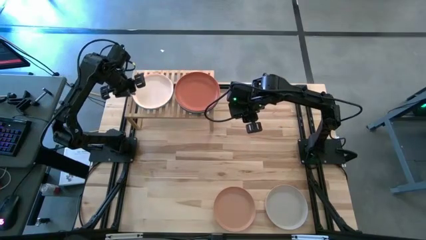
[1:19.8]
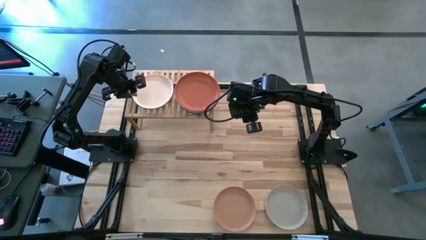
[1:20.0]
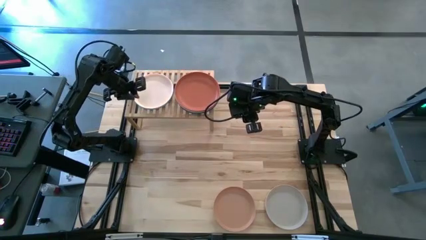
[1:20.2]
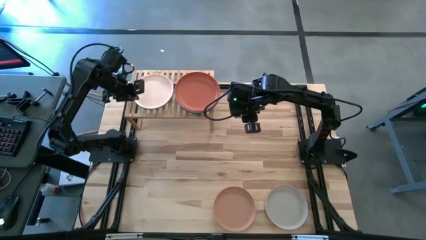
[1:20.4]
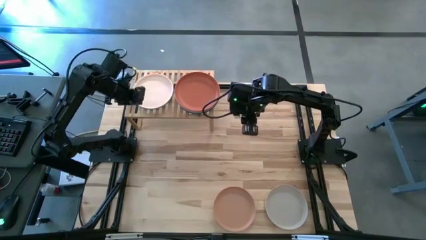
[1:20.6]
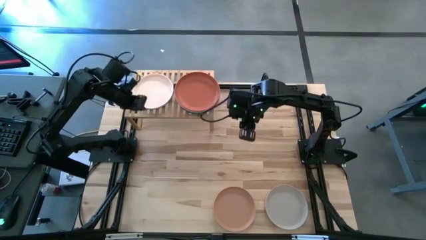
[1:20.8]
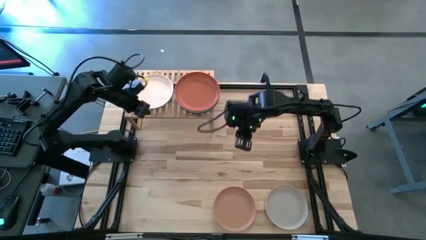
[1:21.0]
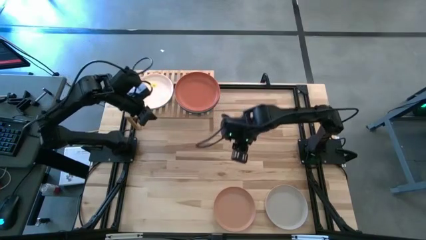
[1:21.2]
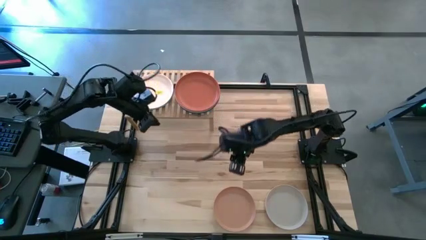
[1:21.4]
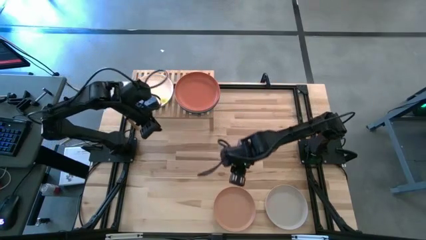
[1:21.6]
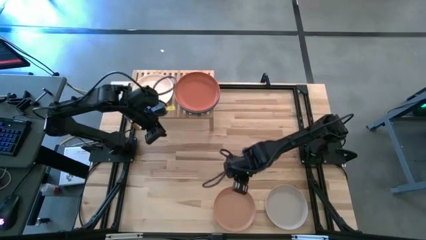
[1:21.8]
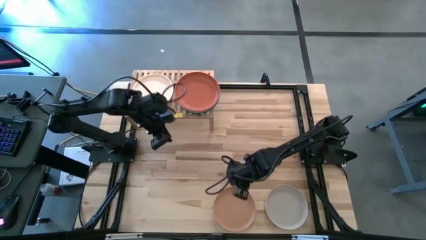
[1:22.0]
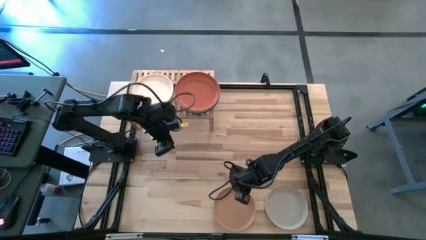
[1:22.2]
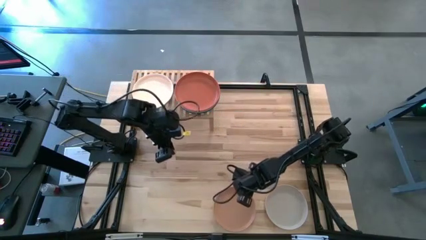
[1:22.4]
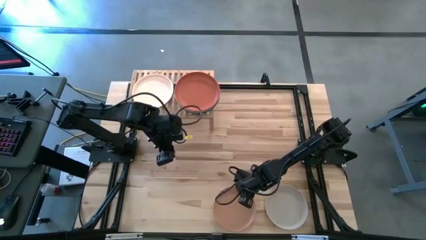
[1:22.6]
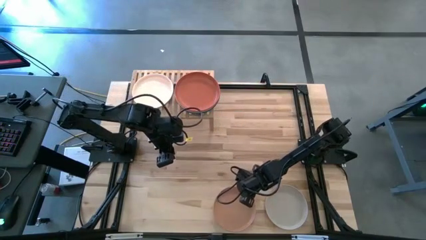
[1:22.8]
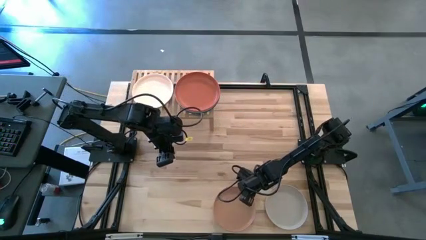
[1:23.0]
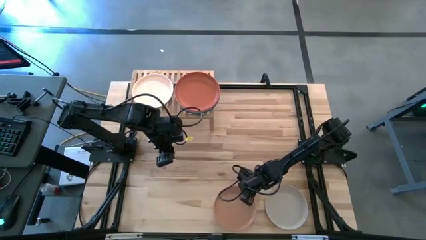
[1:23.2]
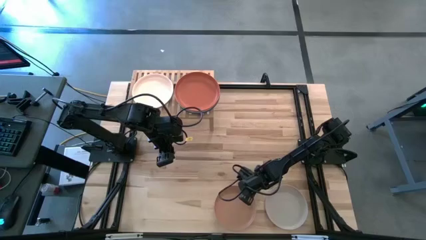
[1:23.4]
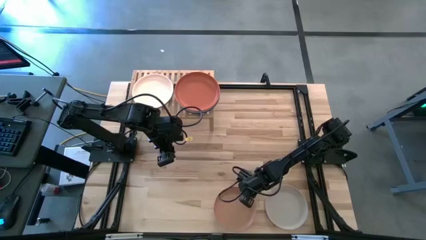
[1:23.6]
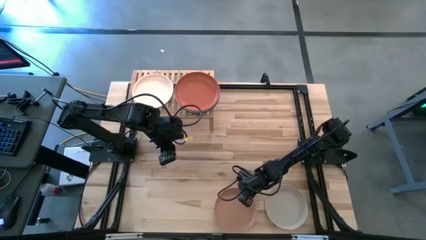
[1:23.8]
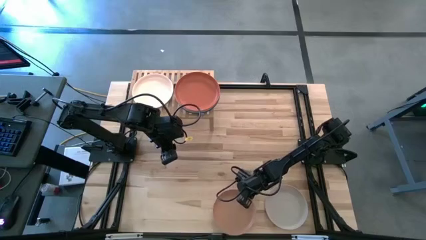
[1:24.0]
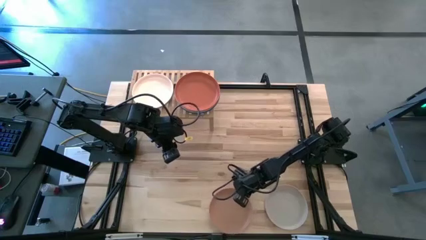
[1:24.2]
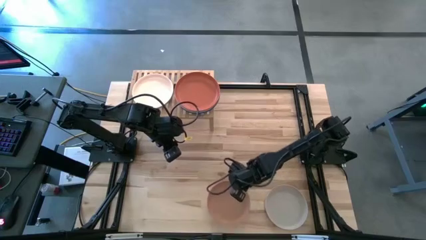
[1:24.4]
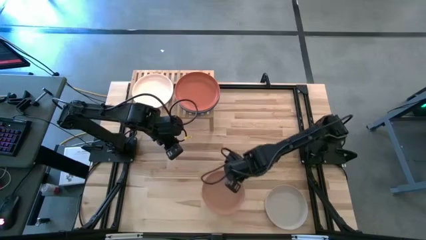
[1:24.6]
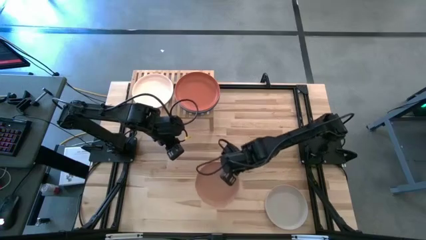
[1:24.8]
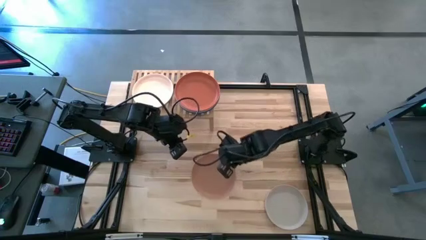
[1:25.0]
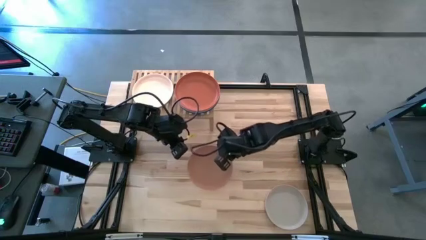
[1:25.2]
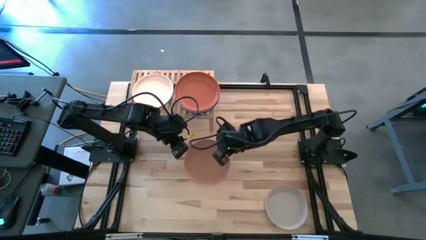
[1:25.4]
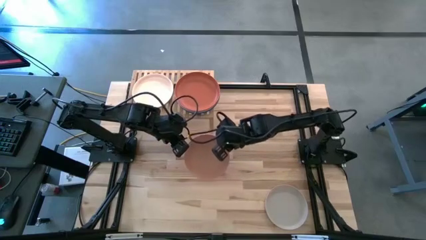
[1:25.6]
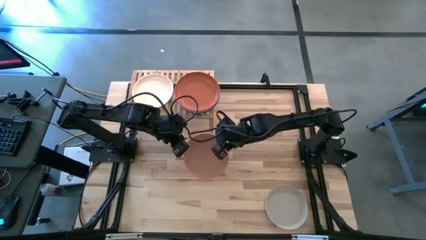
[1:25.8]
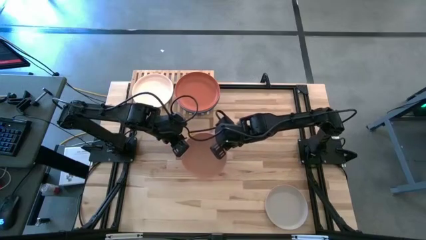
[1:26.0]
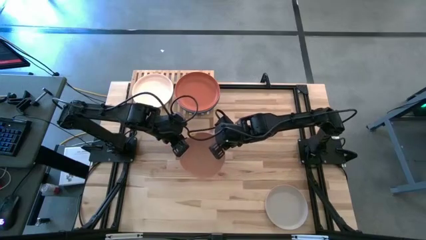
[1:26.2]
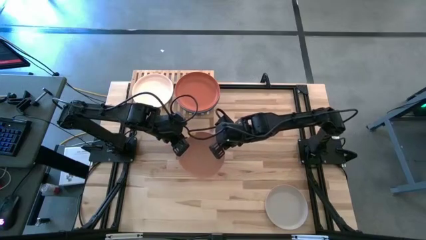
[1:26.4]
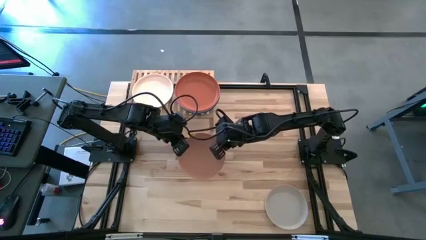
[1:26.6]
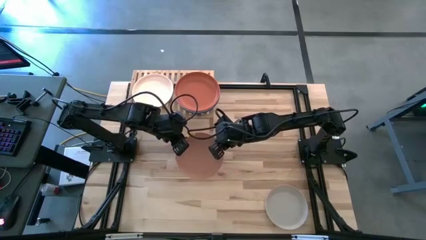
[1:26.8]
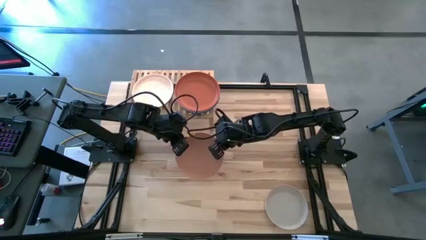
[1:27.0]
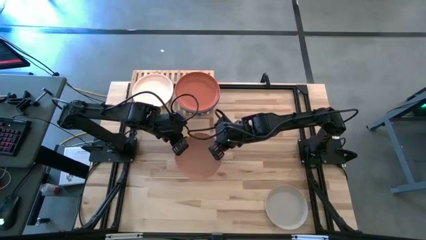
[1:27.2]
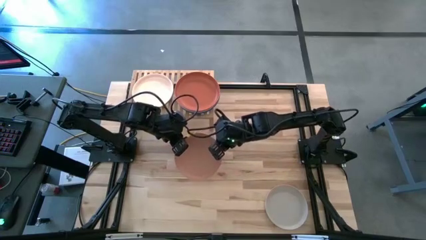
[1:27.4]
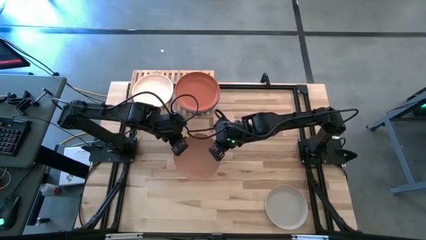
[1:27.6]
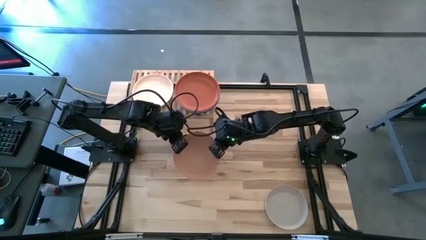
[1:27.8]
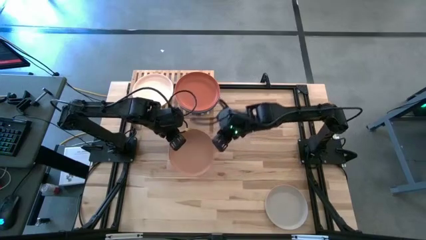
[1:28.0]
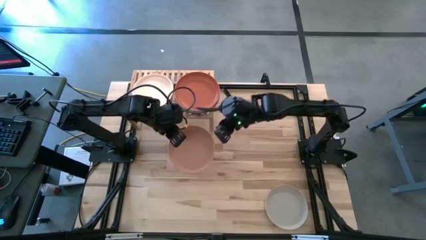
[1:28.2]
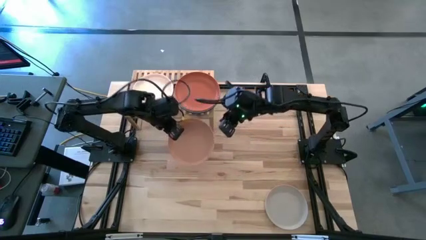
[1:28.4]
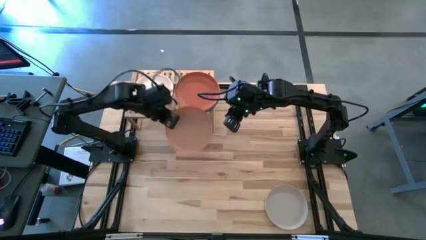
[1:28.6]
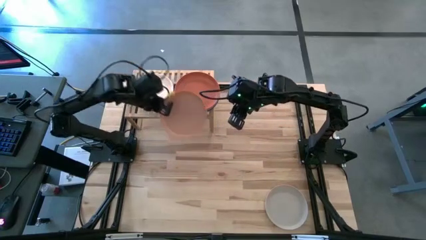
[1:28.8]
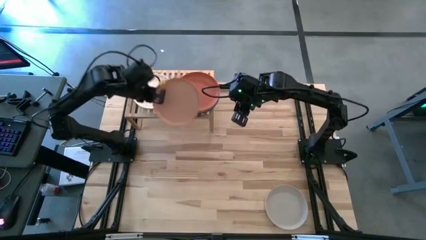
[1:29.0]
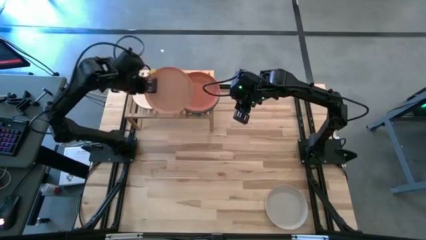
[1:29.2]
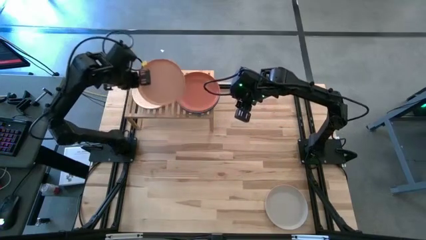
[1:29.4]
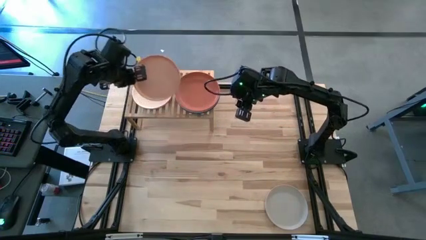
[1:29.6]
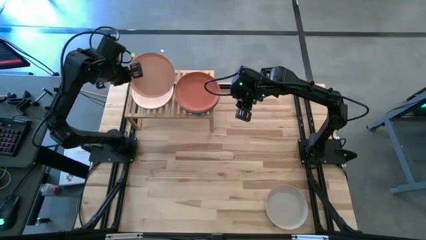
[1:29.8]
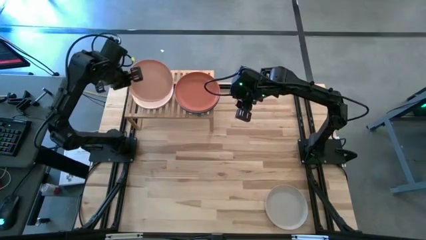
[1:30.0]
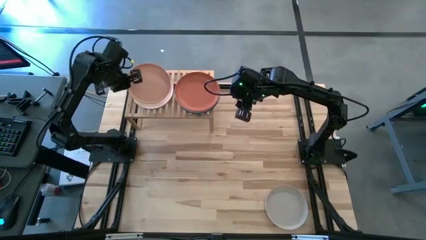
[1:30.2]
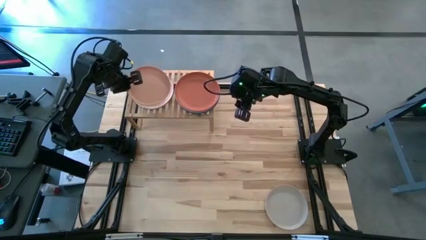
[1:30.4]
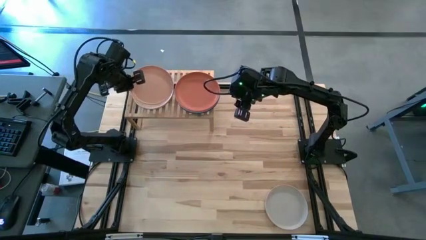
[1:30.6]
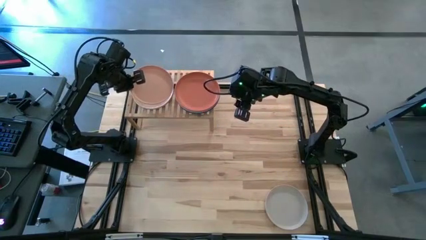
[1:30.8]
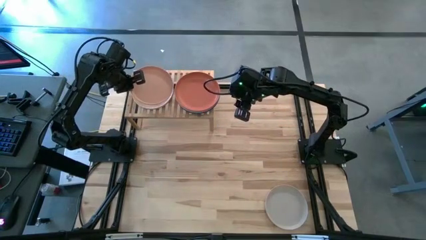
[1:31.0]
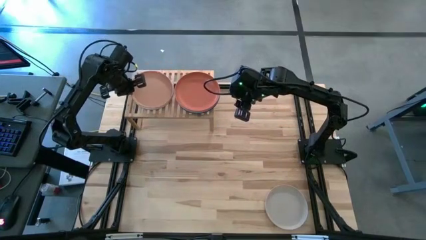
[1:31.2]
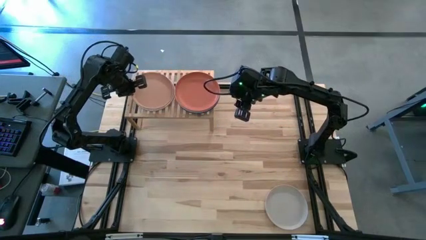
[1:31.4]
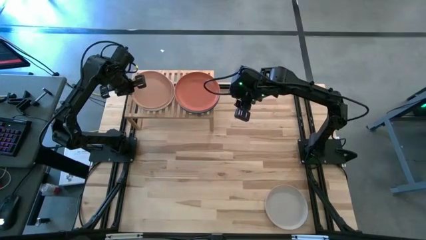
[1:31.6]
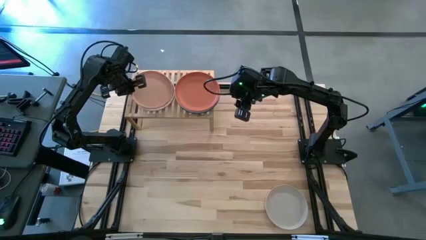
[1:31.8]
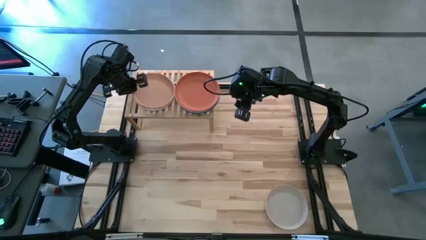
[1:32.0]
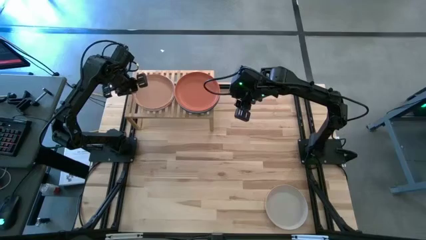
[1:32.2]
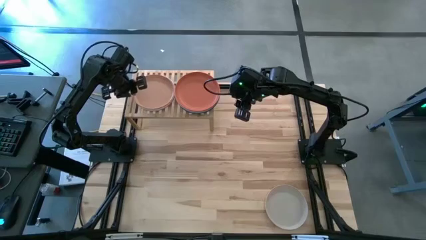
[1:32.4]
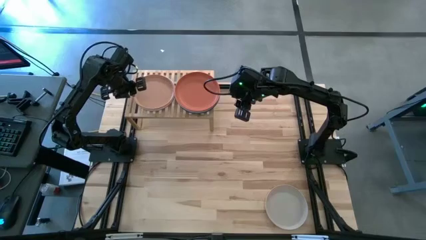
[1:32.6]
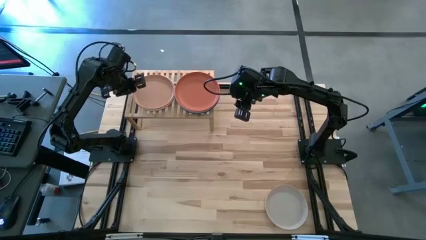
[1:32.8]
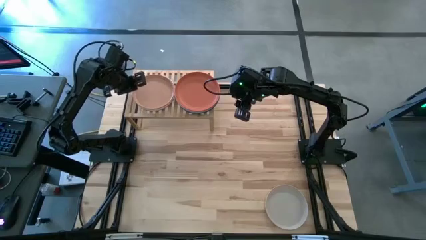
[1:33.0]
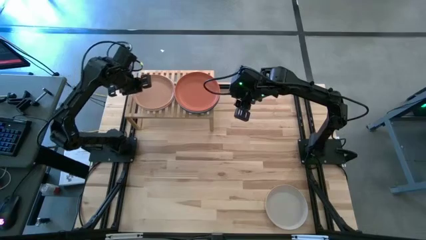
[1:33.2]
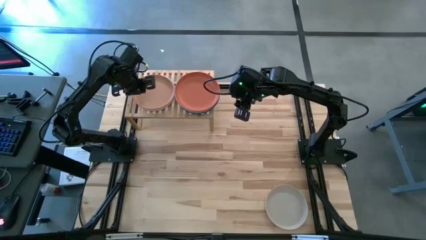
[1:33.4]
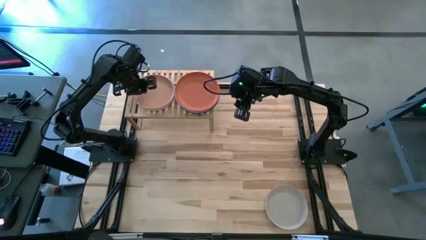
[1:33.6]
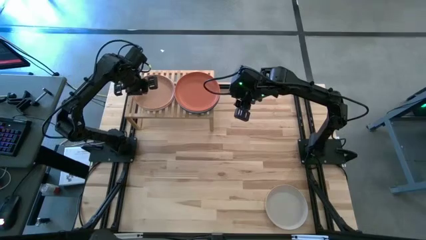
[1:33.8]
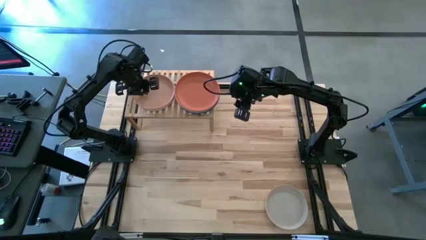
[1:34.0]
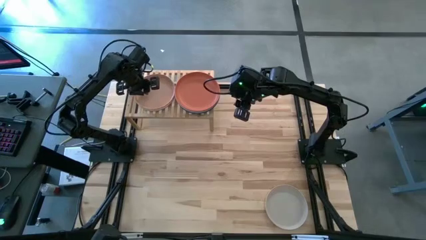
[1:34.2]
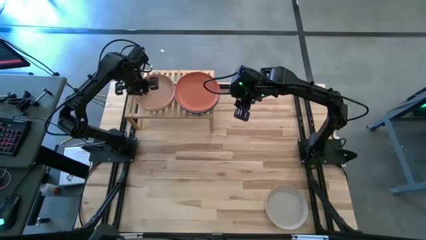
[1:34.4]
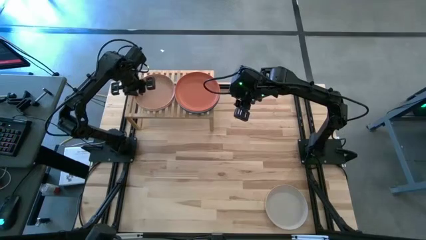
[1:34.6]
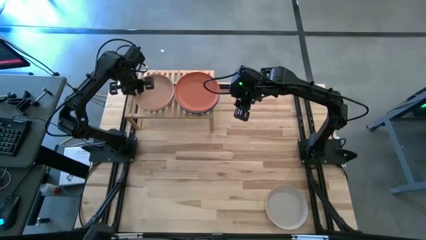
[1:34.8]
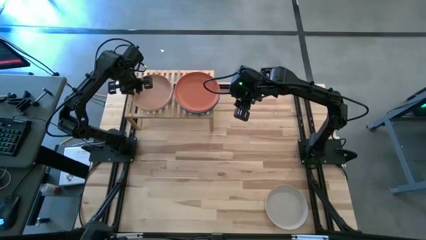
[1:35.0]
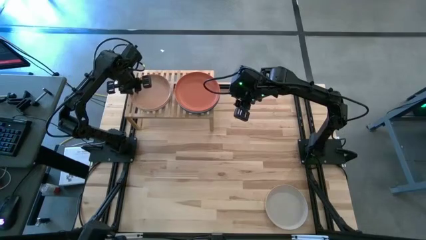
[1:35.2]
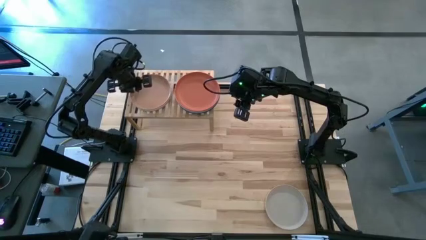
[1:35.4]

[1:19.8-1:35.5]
Task: Place and stack plates onto a shelf
Stack the brown plate on top of the light orange plate on the shelf
